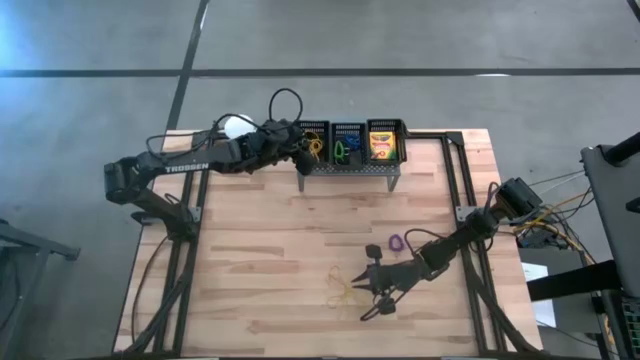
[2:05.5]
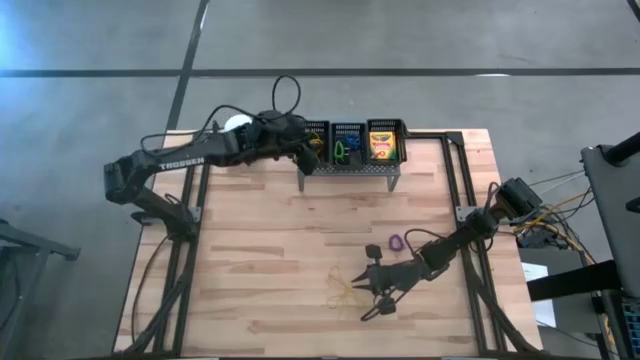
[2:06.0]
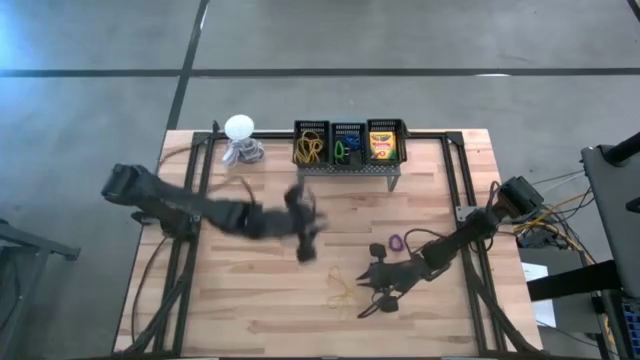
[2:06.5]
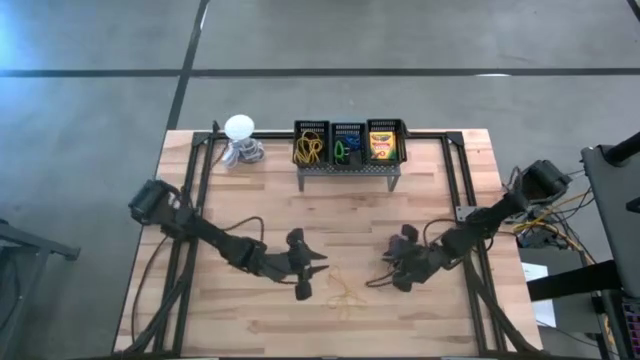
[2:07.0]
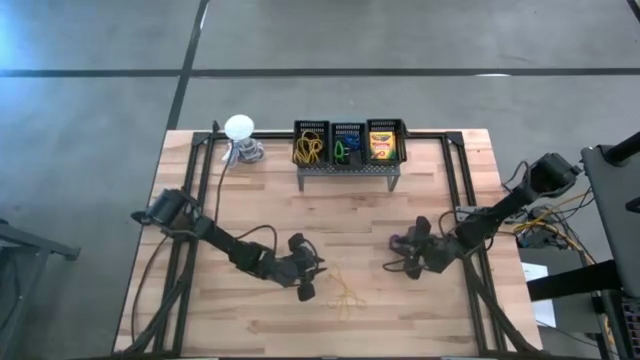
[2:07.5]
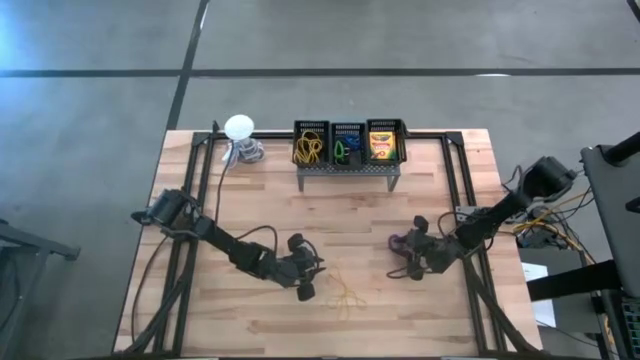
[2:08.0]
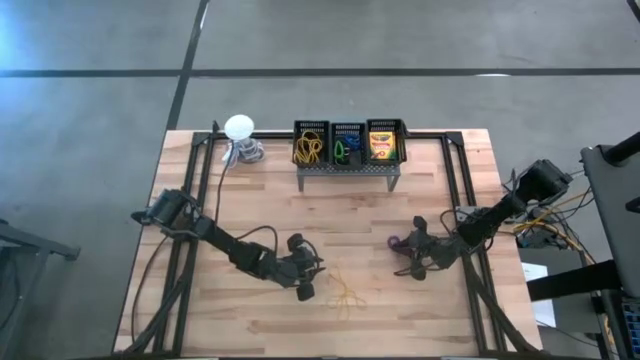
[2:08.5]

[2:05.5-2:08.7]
Task: Pick & Place Office Desk Supplies
Put the violet keychain into the middle black bin on the shelf

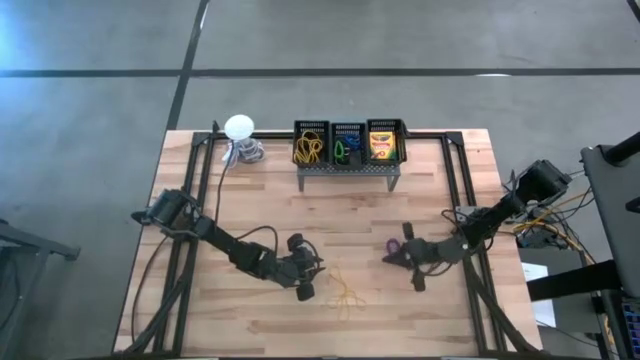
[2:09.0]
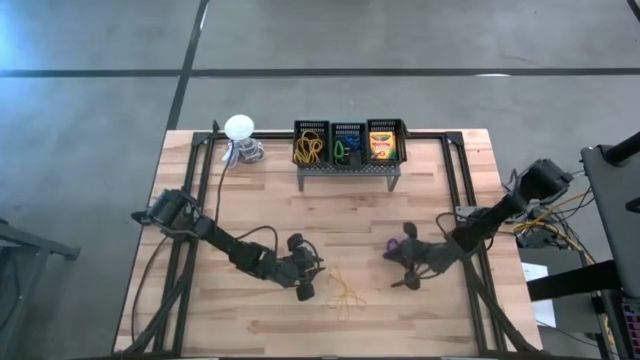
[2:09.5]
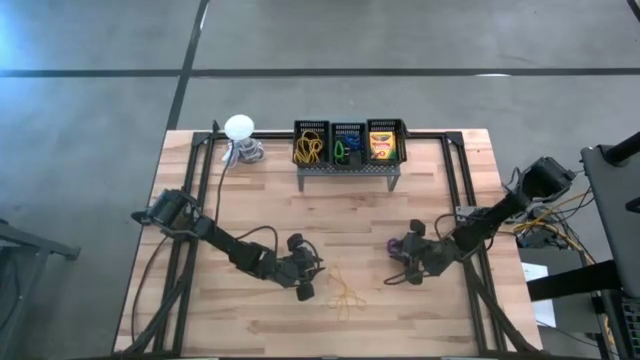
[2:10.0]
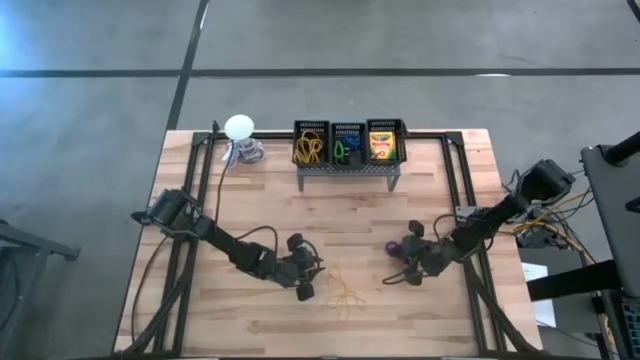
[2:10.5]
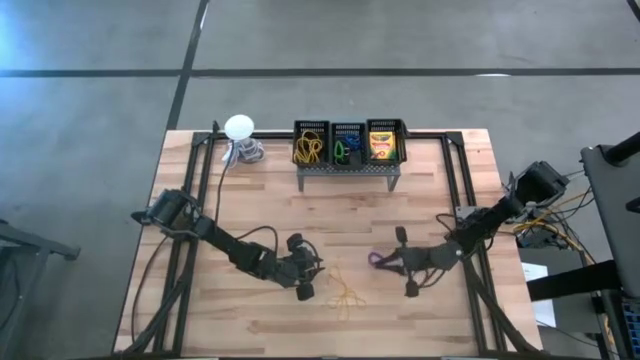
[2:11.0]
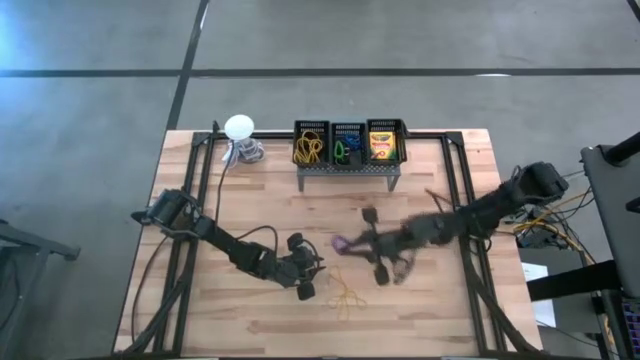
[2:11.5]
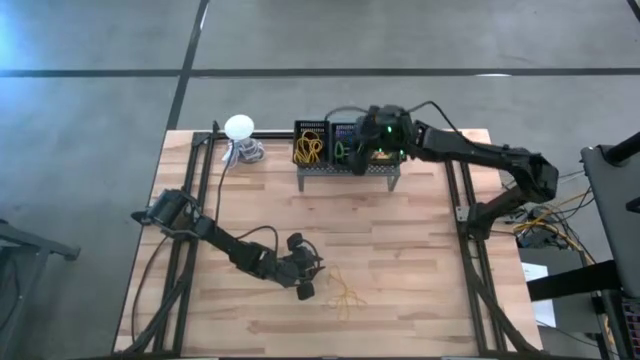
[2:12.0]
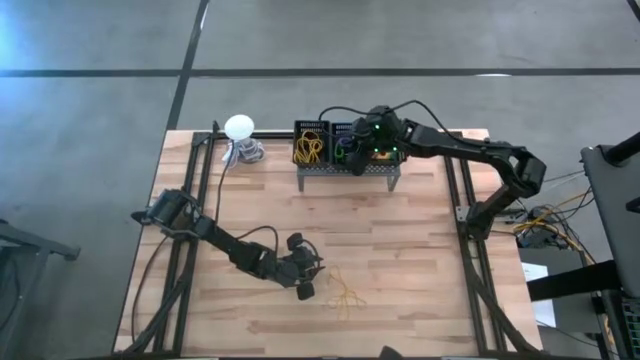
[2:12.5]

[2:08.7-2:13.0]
Put the violet keychain into the middle black bin on the shelf

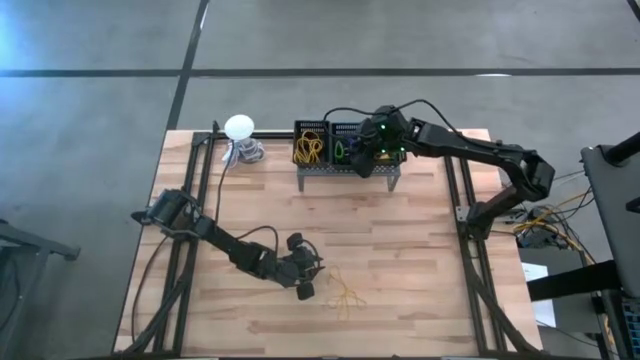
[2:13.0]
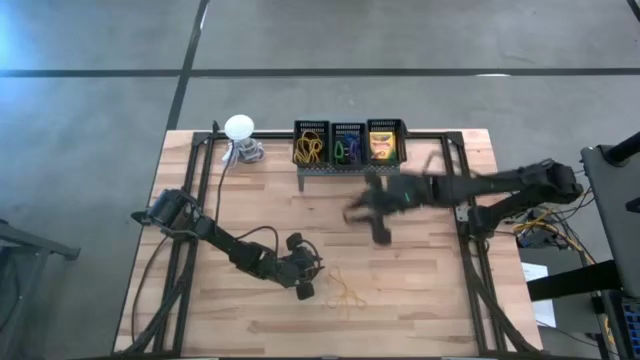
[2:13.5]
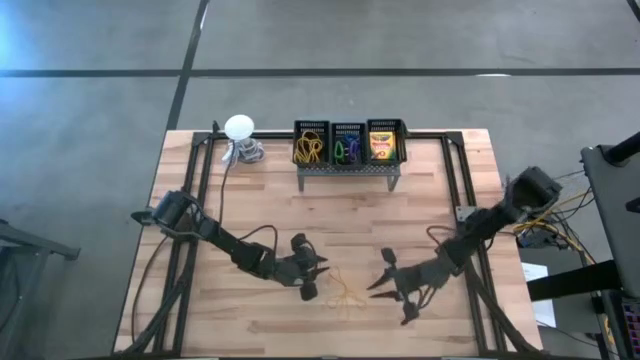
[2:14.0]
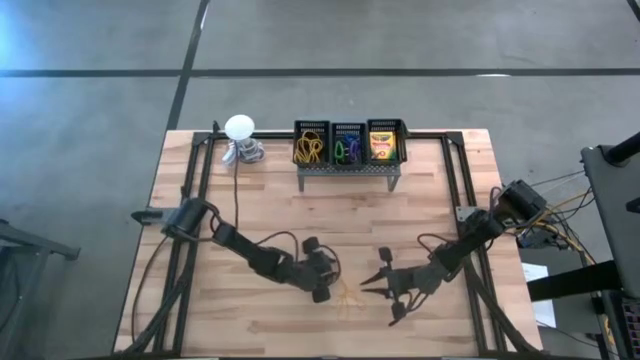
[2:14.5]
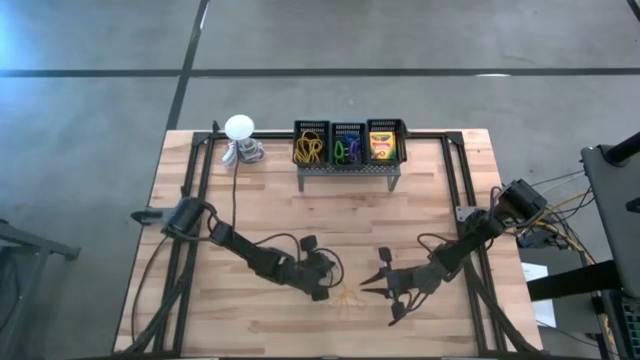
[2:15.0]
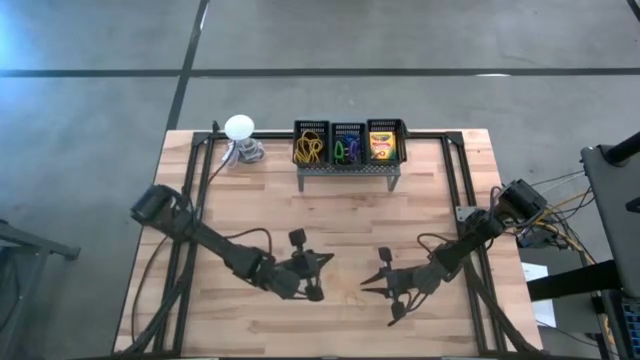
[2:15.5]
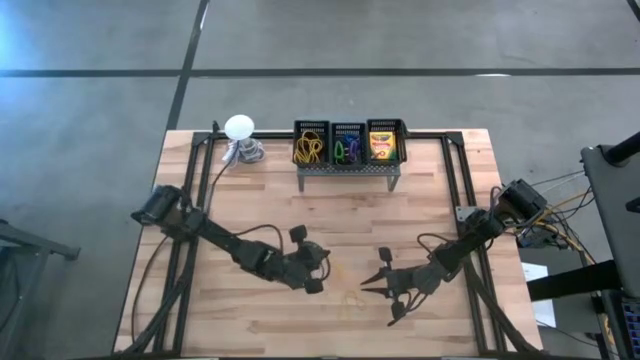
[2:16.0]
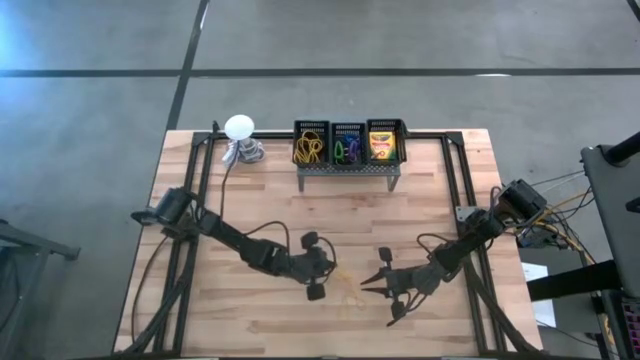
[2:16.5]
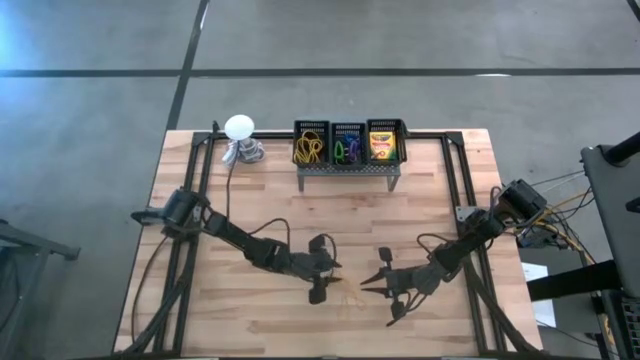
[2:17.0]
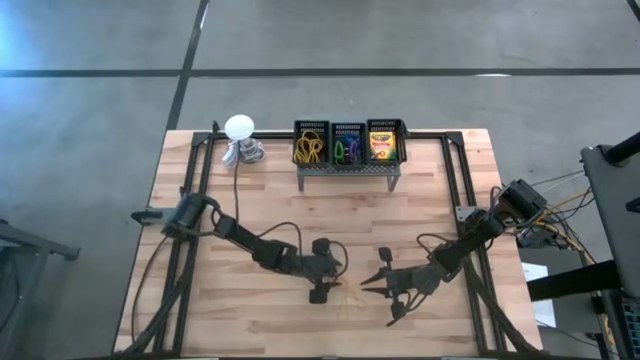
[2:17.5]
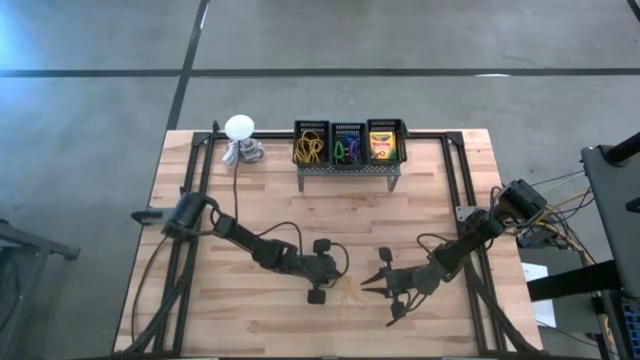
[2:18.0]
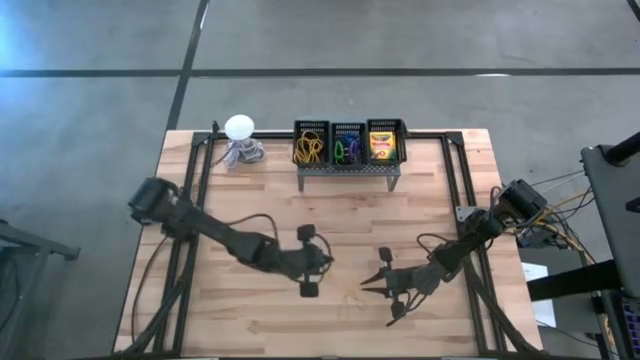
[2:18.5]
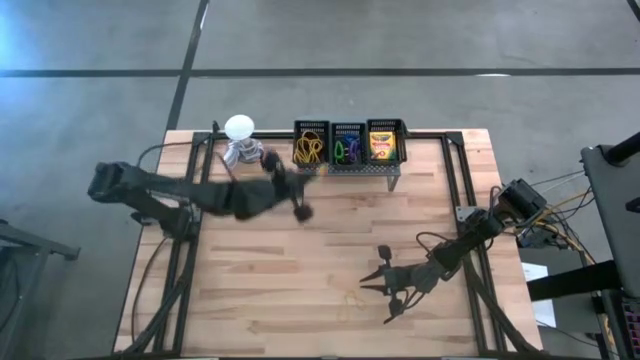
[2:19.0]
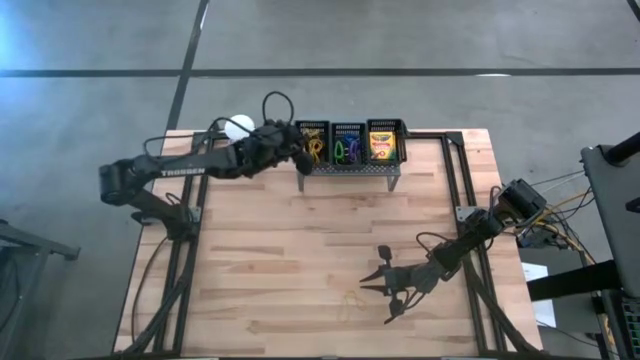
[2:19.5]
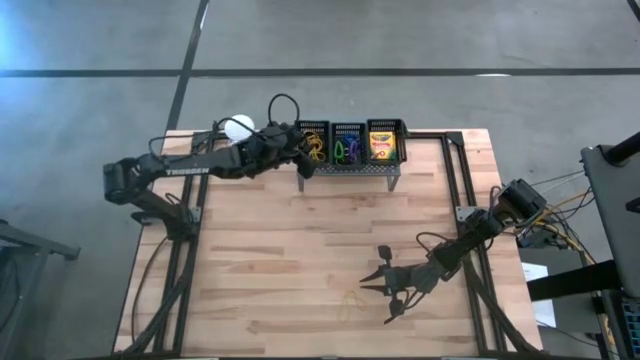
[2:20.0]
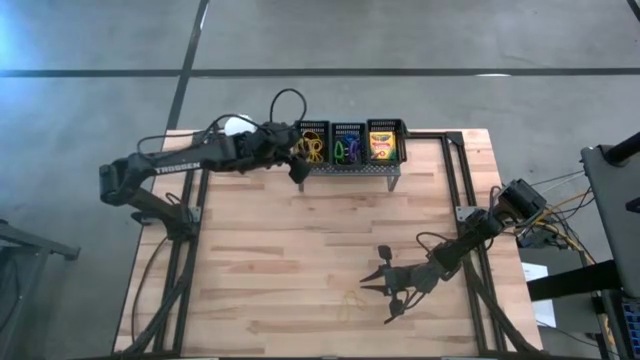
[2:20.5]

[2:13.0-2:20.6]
Put the yellow rubber band into the left black bin on the shelf

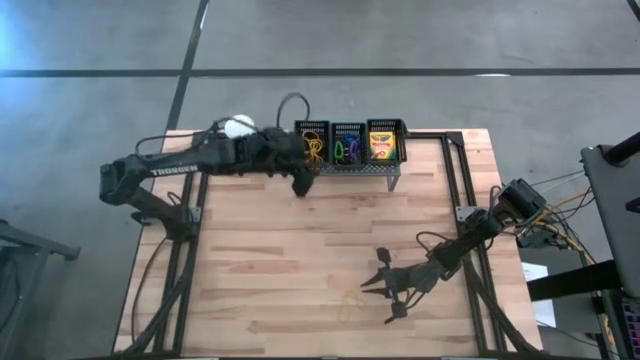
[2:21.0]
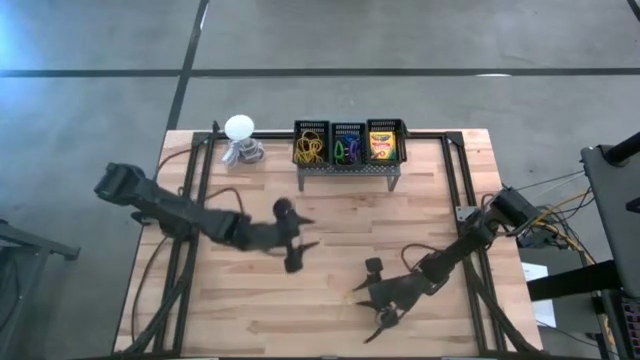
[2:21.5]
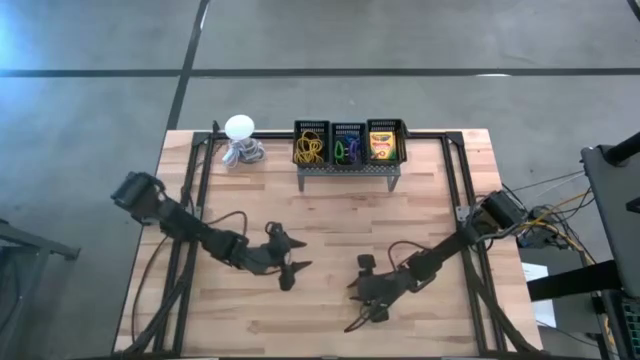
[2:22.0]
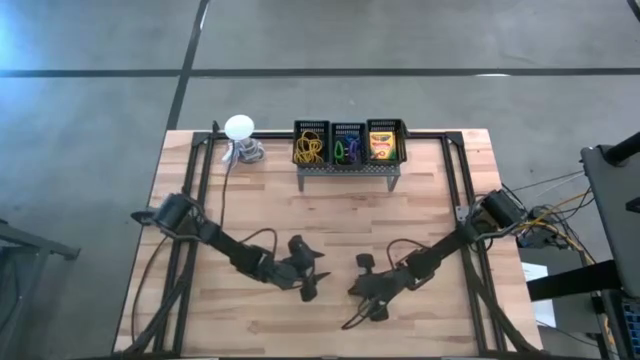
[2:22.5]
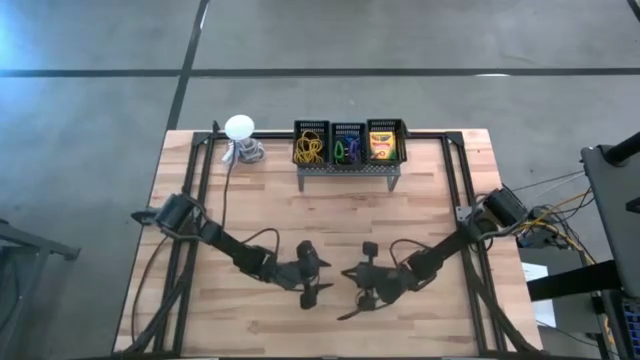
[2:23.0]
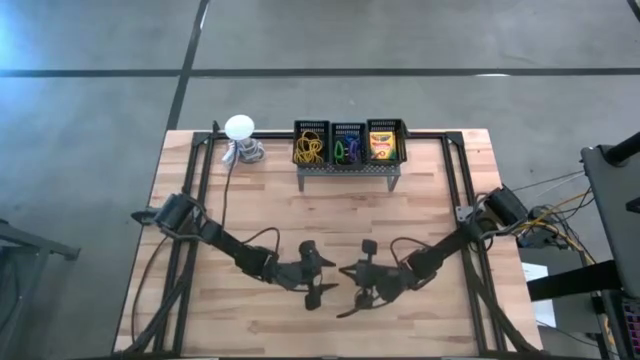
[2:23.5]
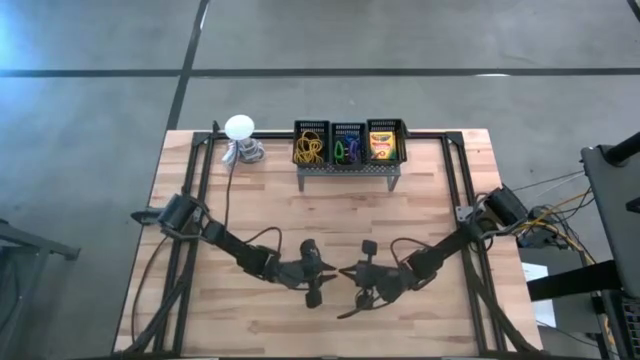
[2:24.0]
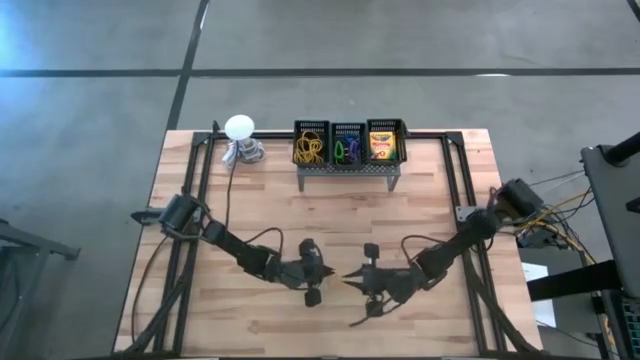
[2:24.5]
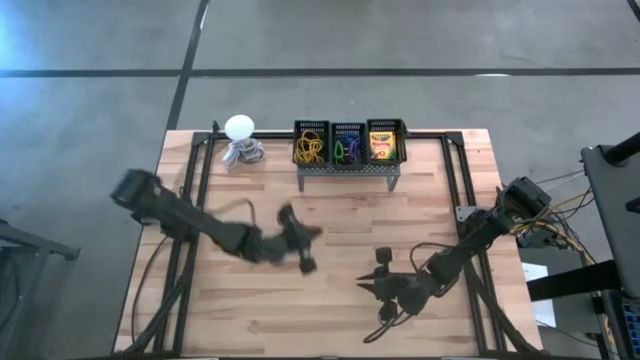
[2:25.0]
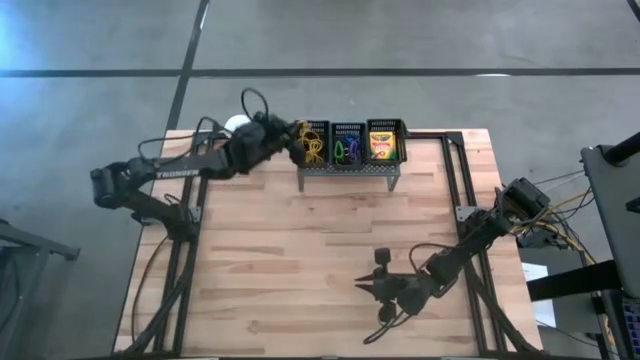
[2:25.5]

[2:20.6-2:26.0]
Put the yellow rubber band into the left black bin on the shelf
